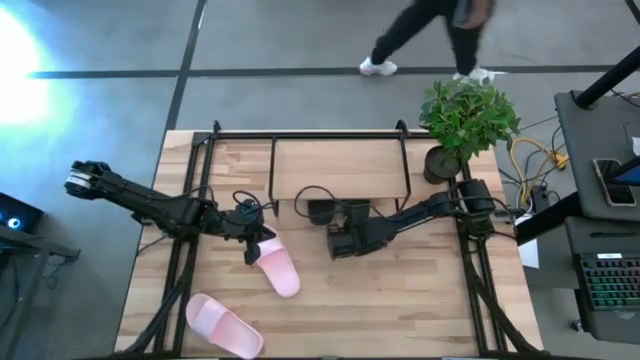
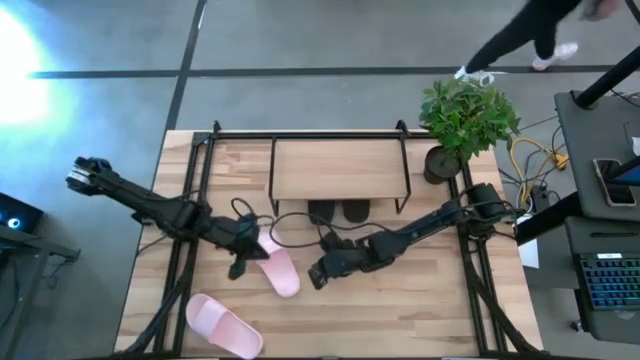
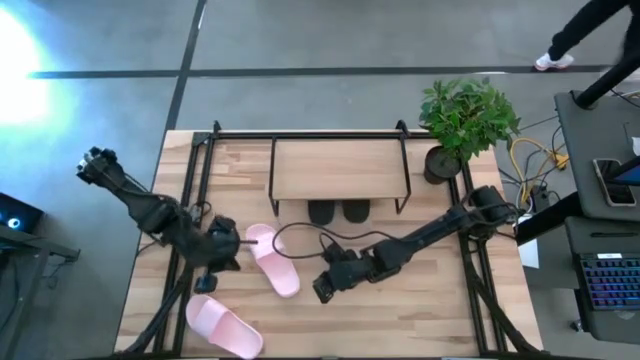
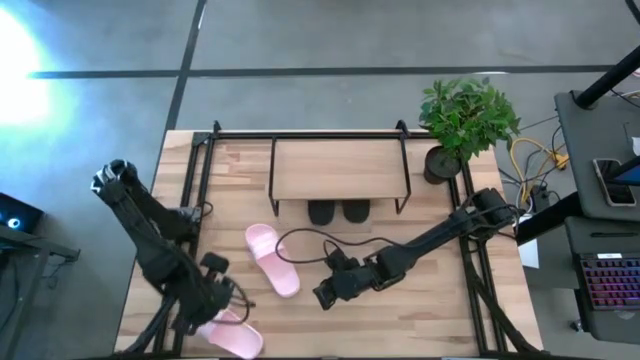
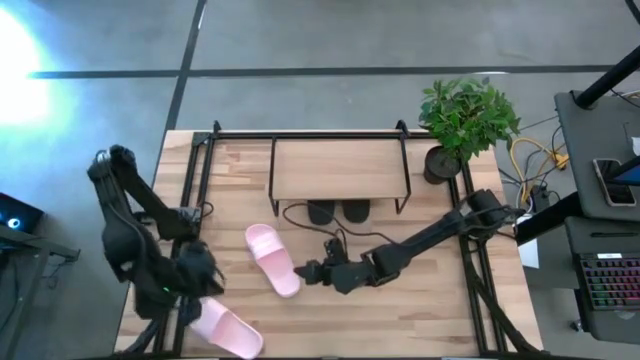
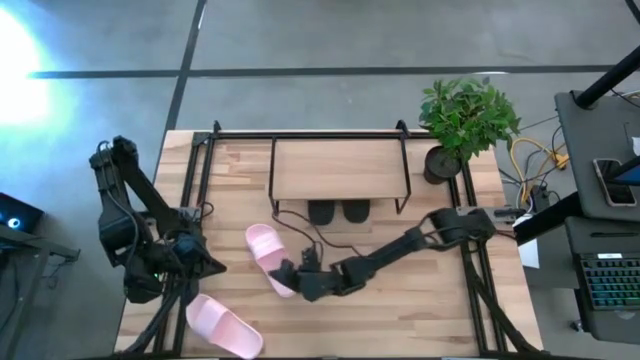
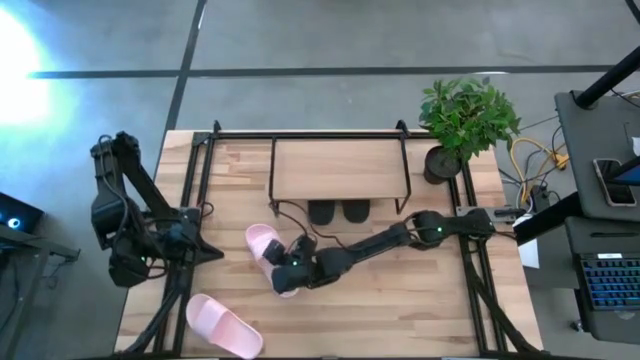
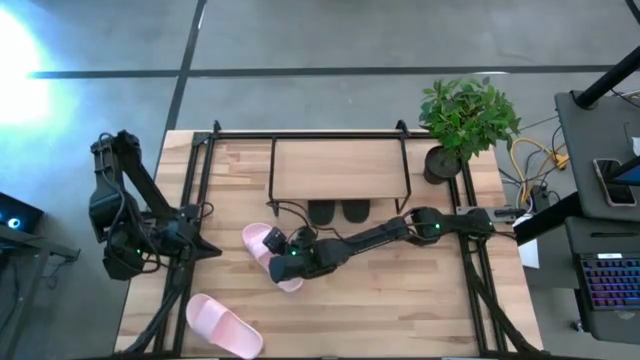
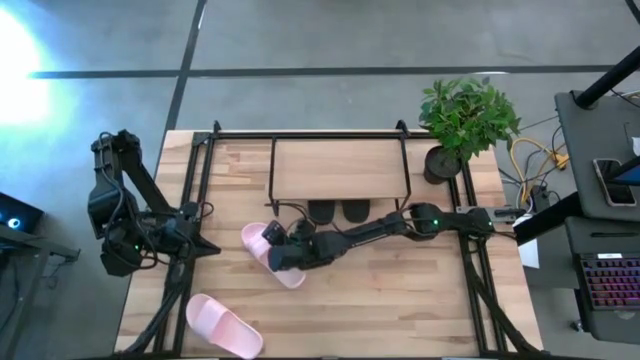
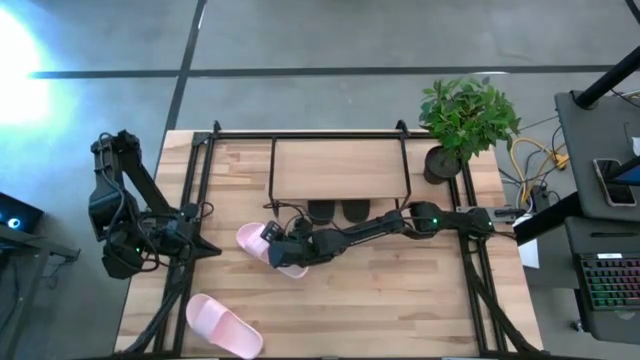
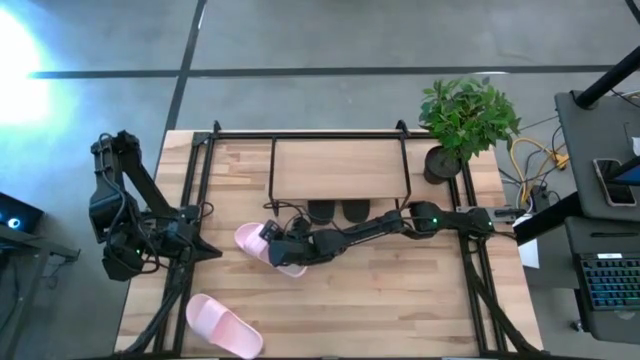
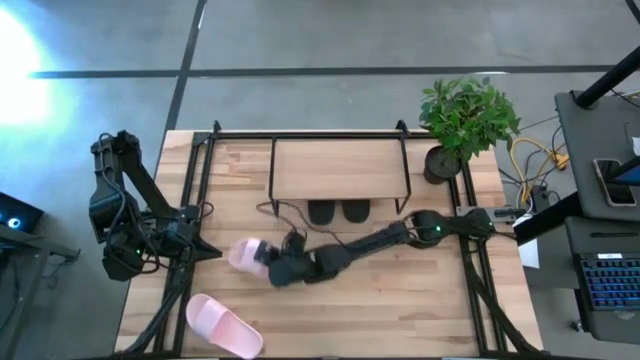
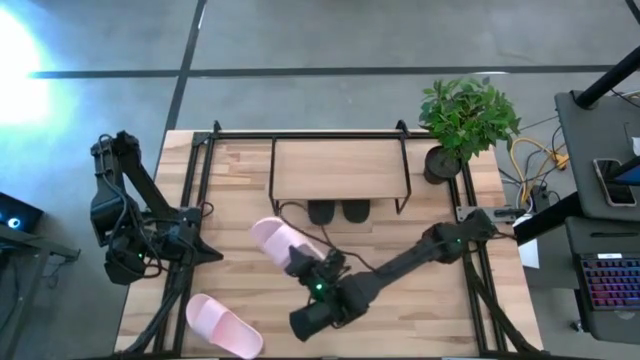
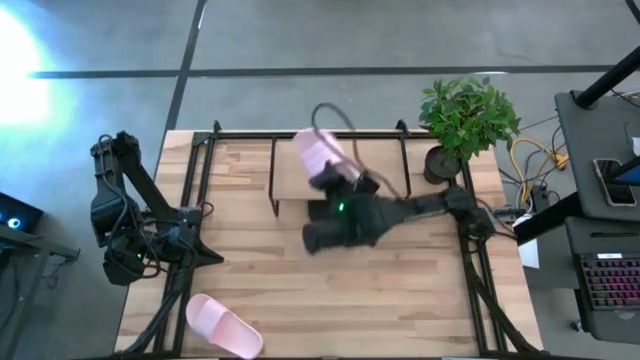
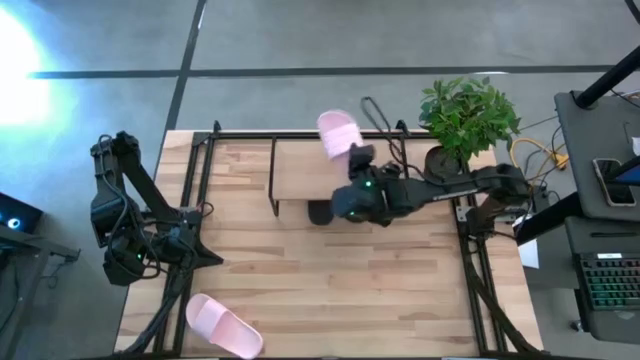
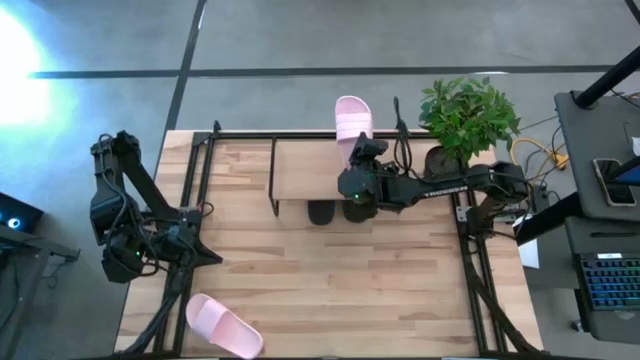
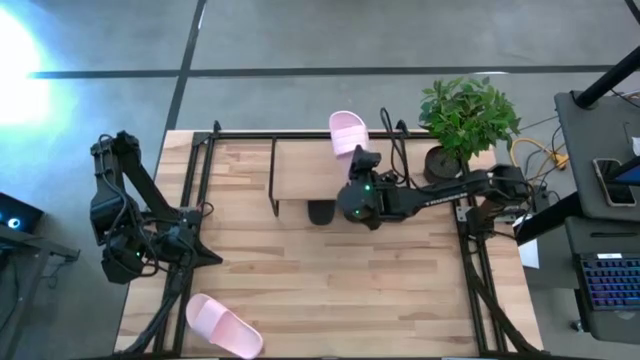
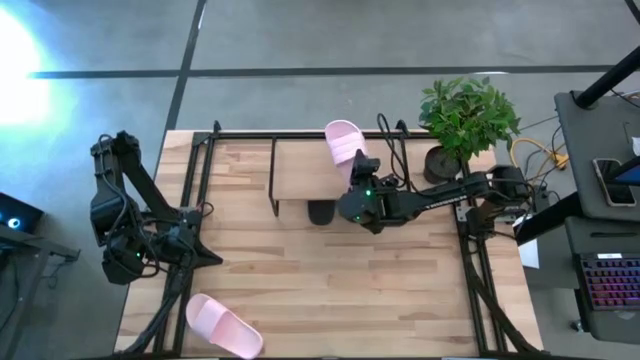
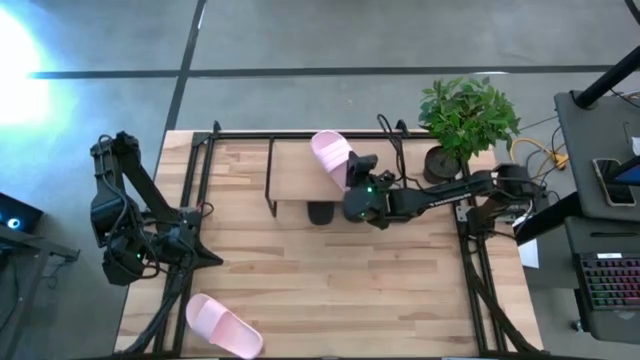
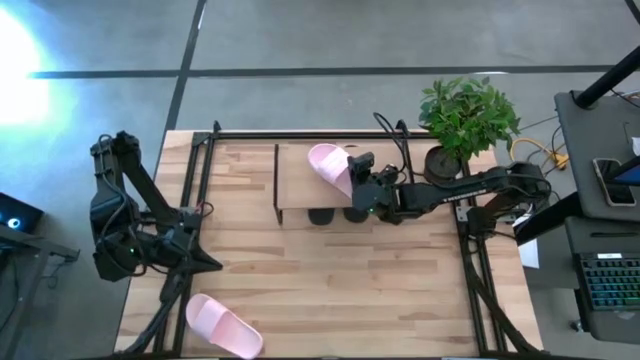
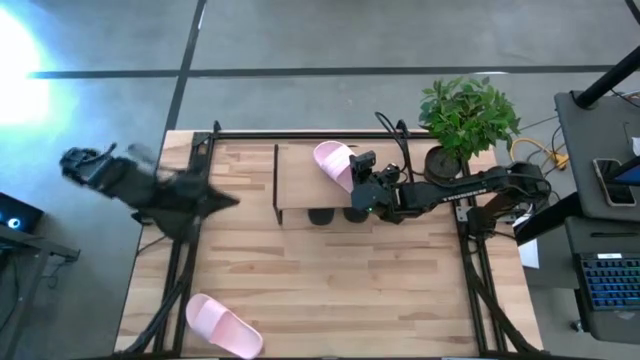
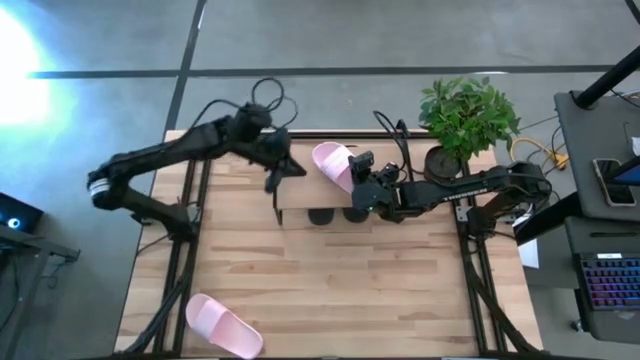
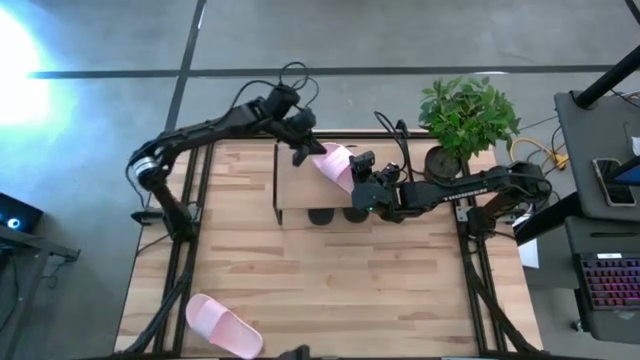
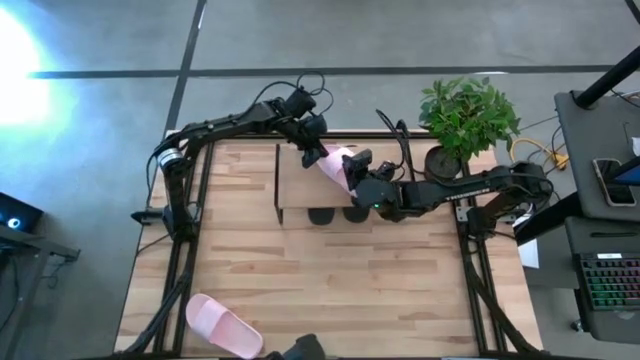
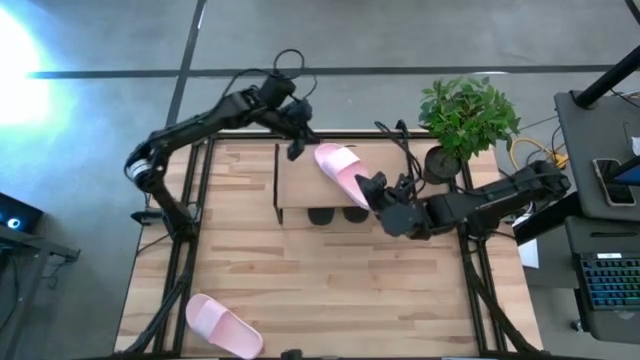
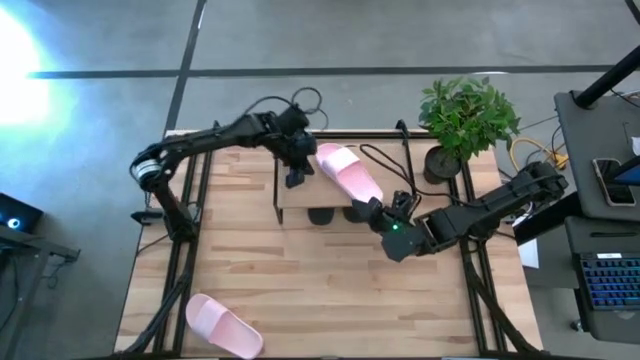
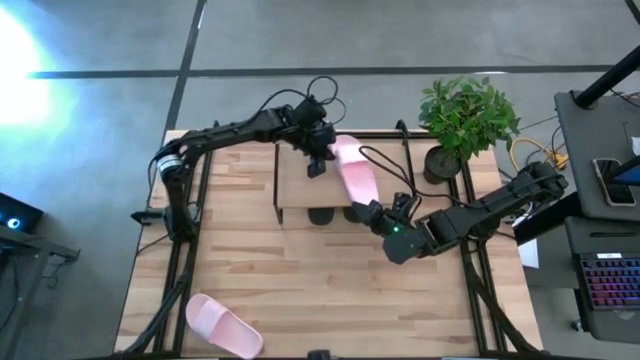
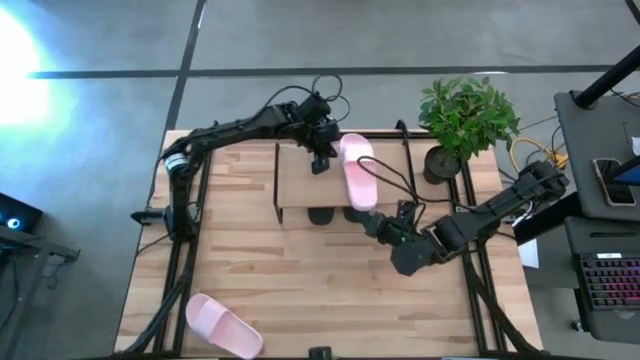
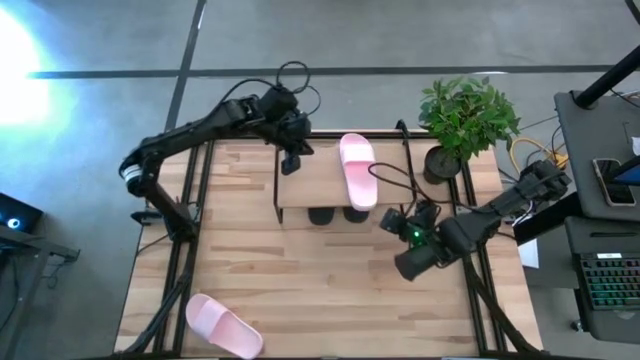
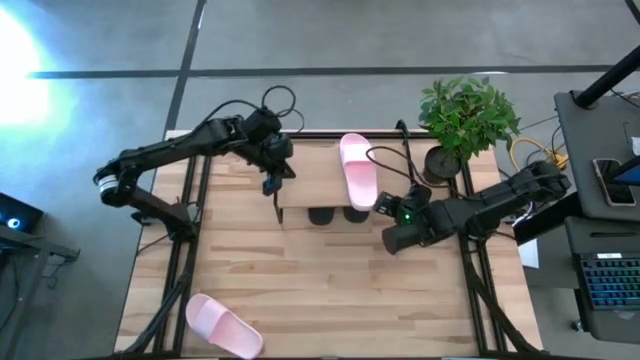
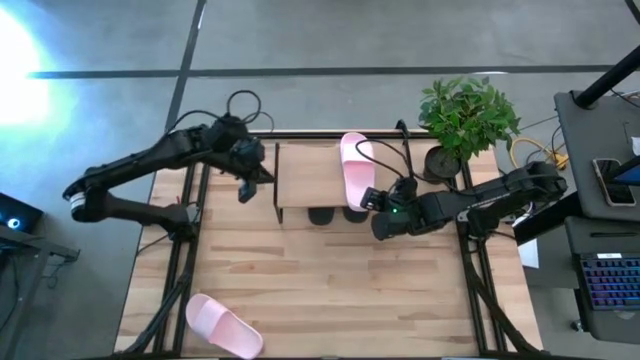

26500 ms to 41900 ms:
Task: Pick and place slides into the shelf
Put the top pink slide on the shelf

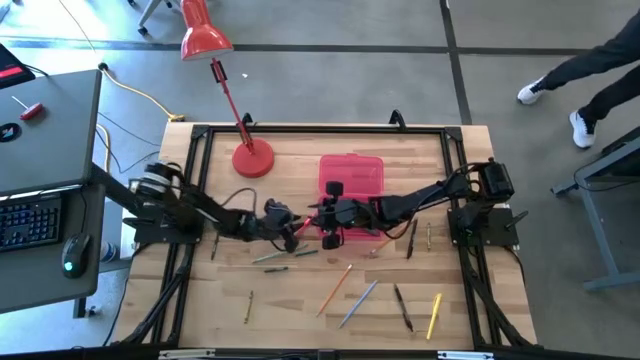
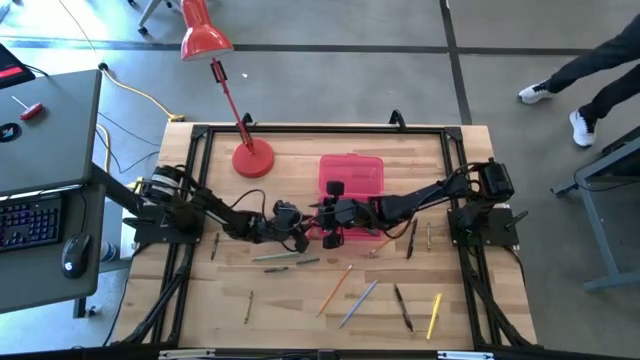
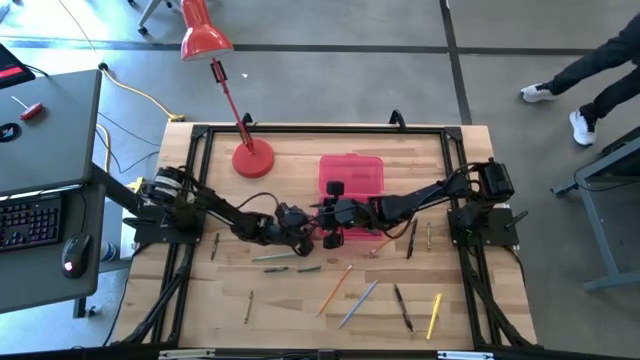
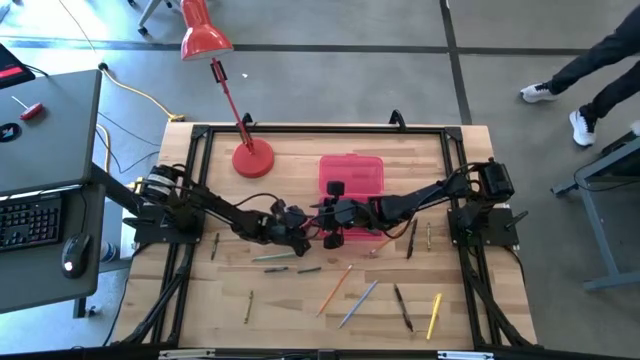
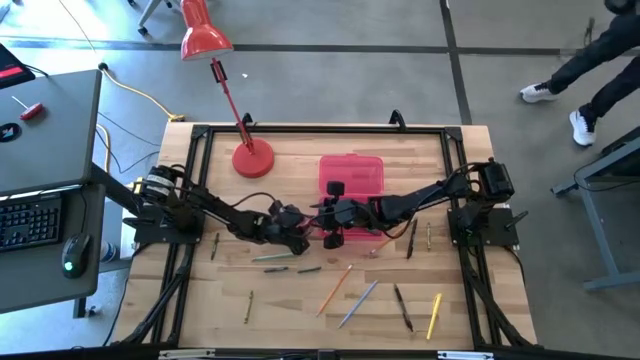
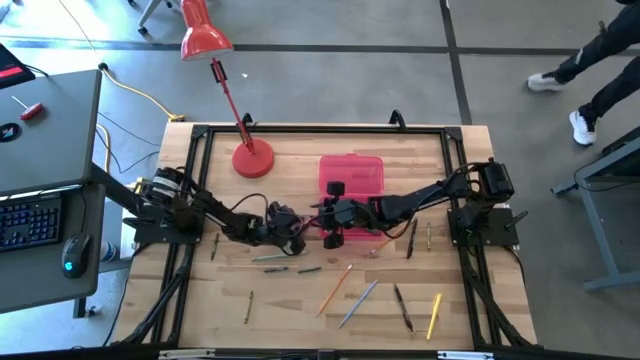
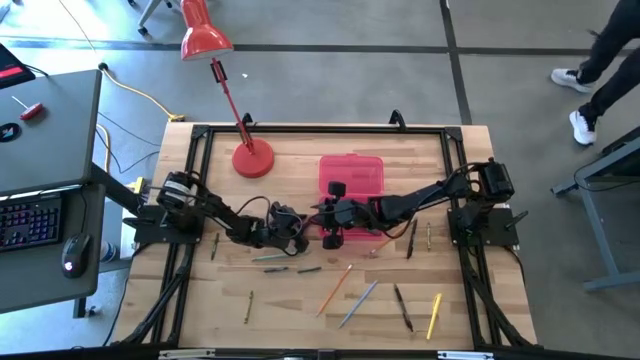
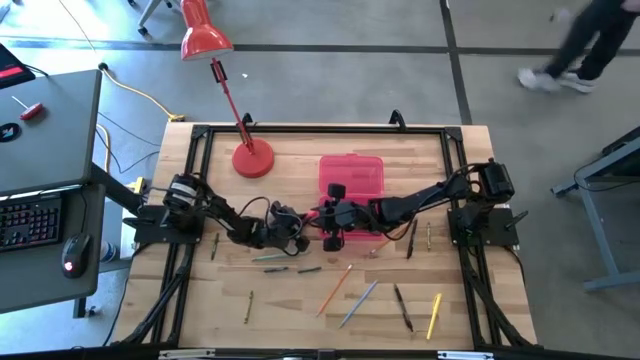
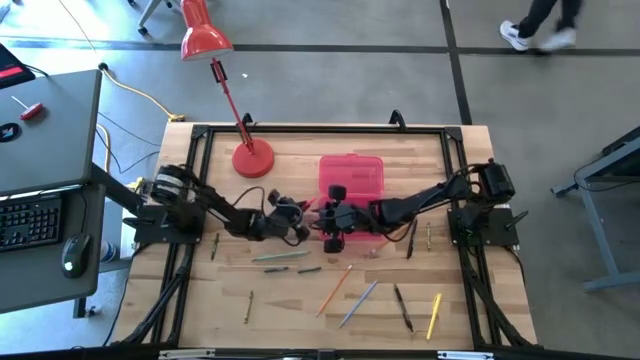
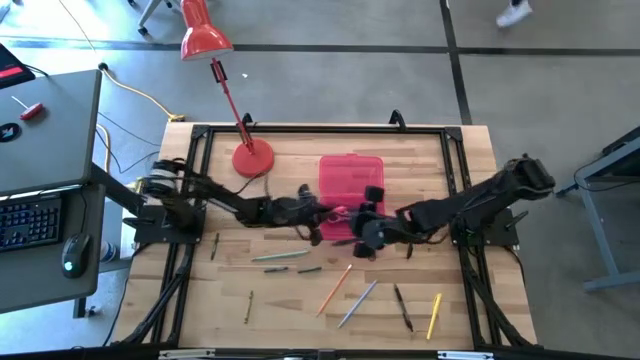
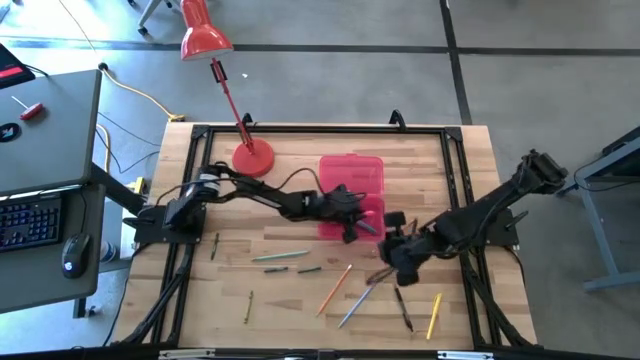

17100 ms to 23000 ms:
Task: Pick & place school supplies into a supply box
Put the pink pen into the red supply box
